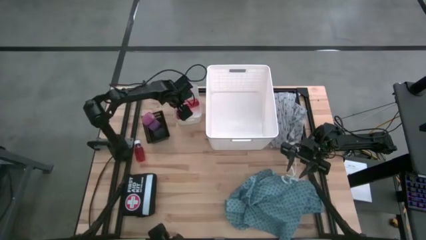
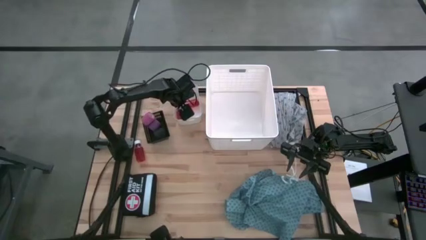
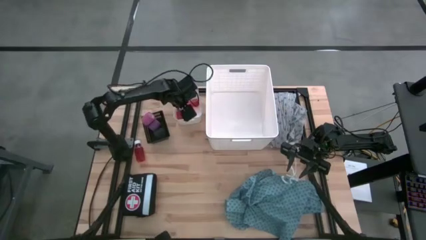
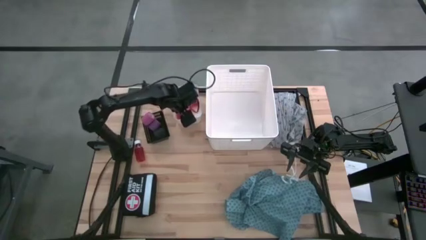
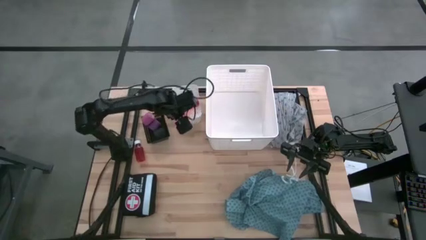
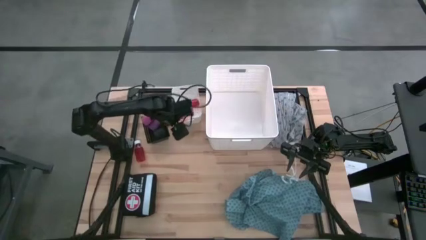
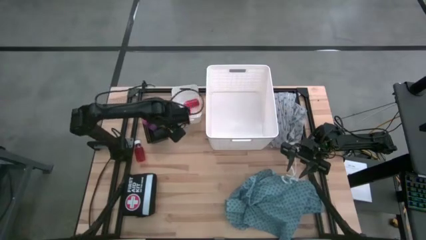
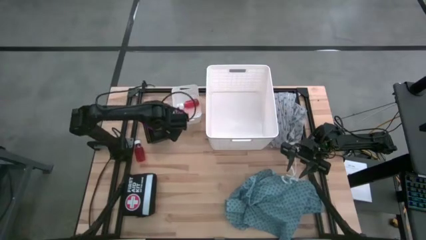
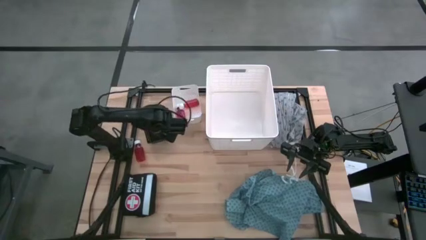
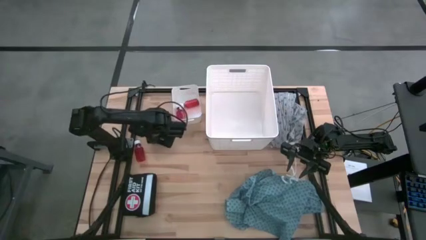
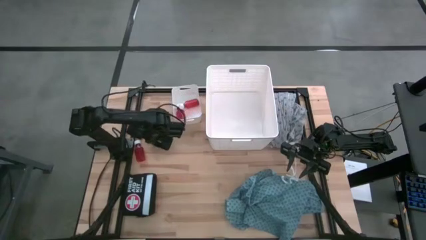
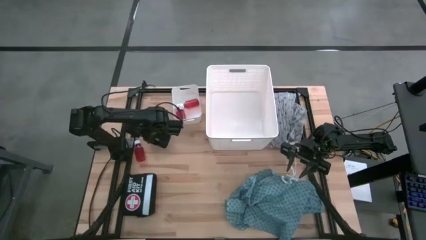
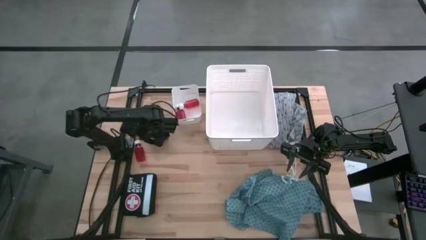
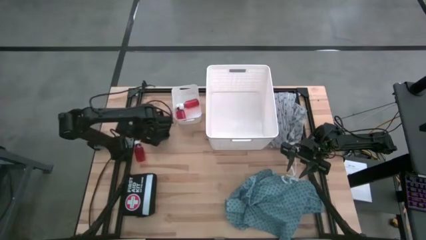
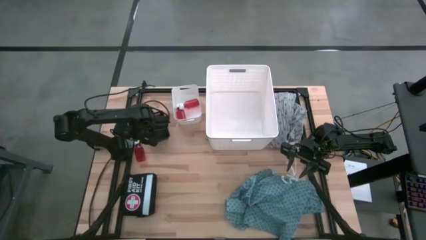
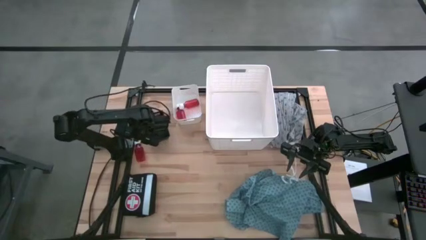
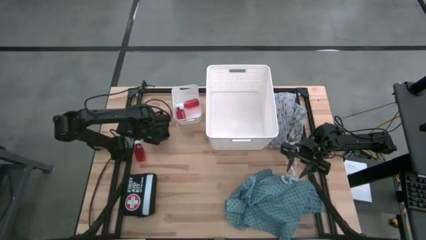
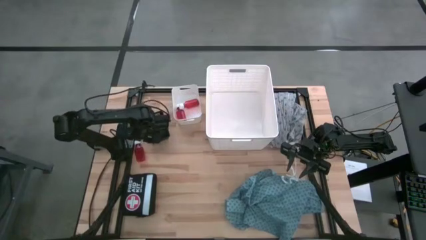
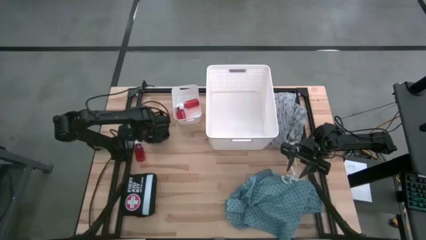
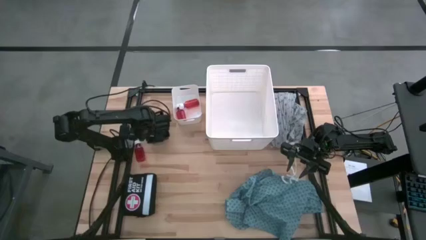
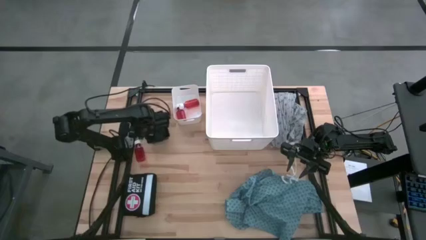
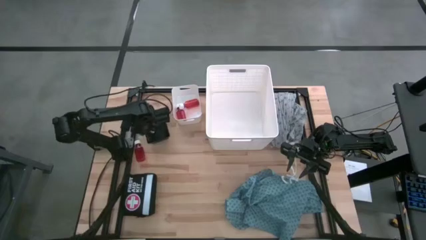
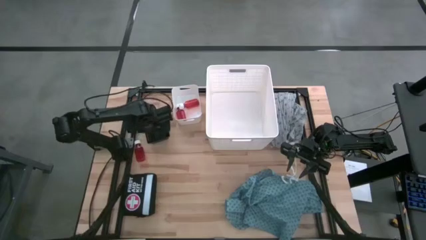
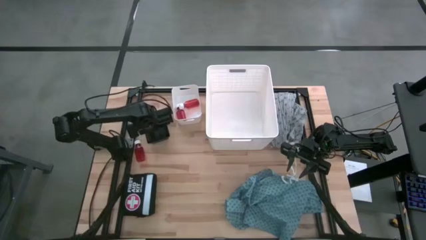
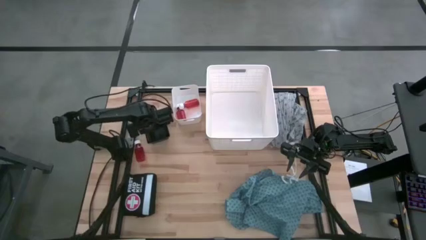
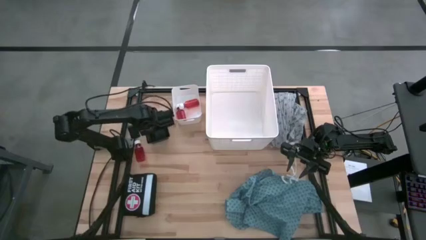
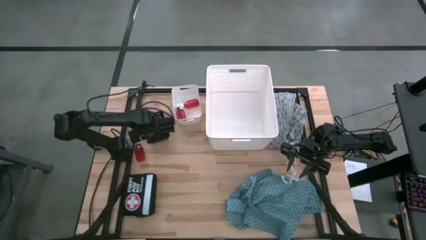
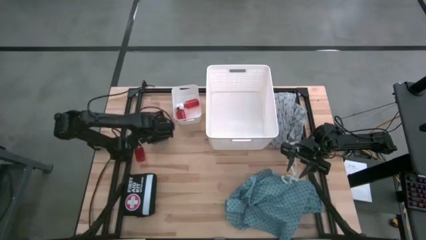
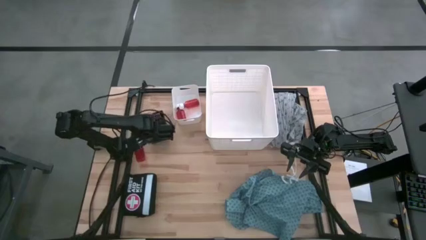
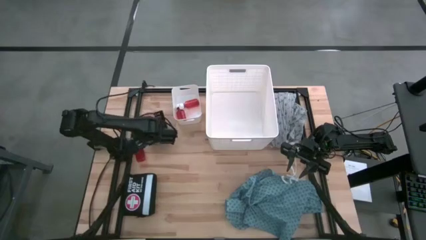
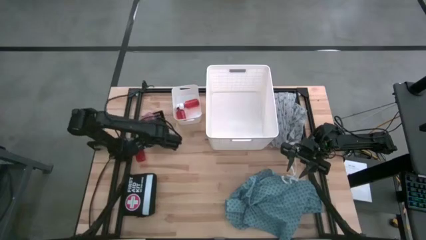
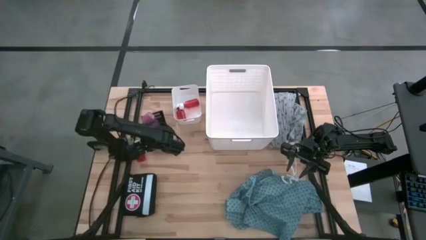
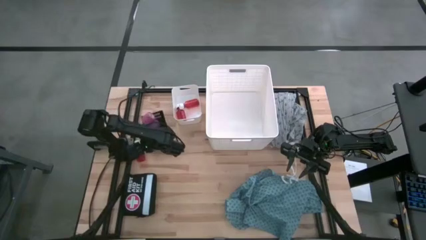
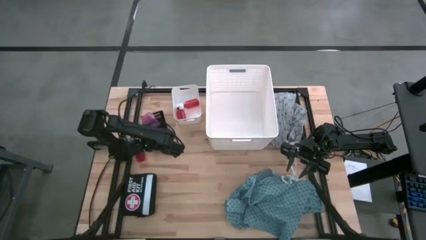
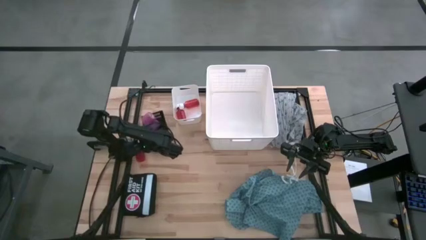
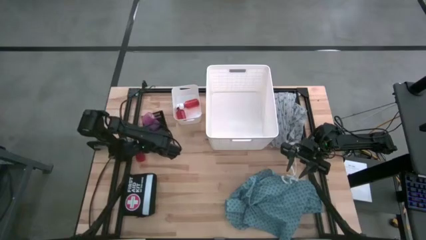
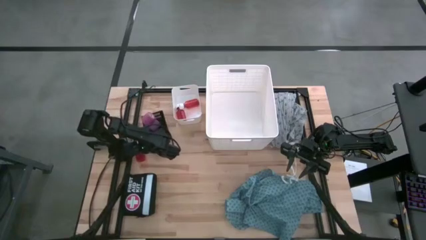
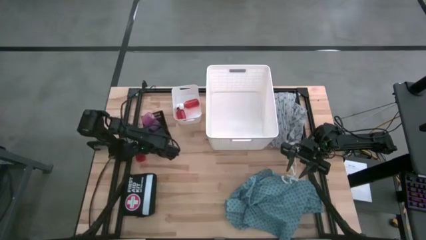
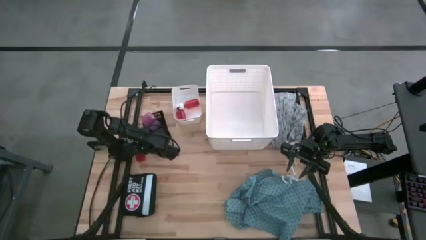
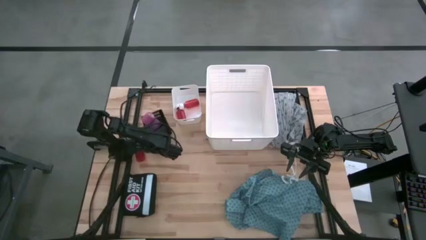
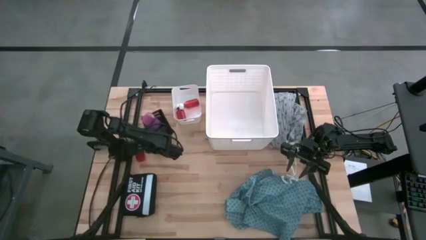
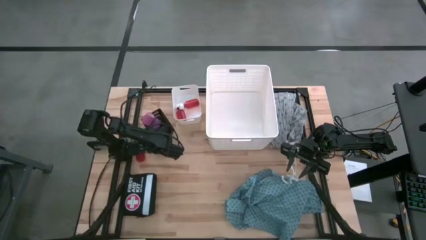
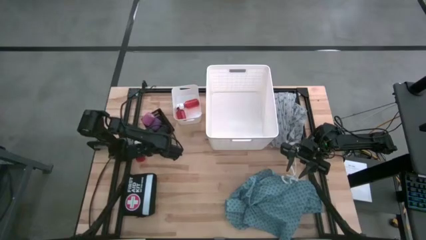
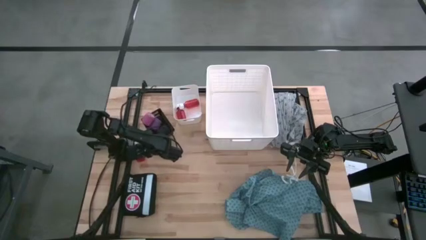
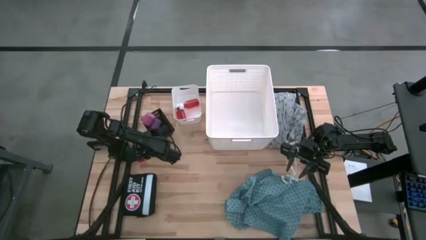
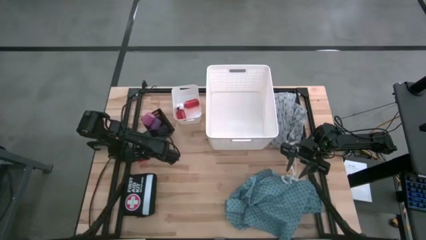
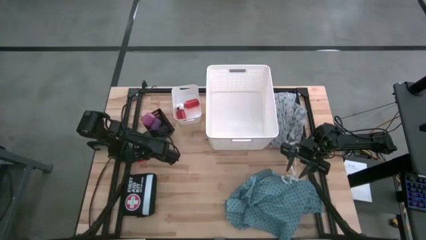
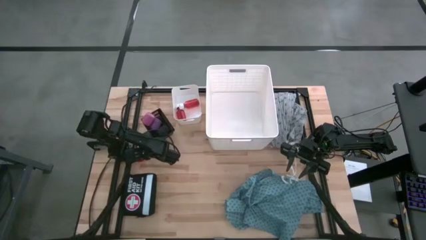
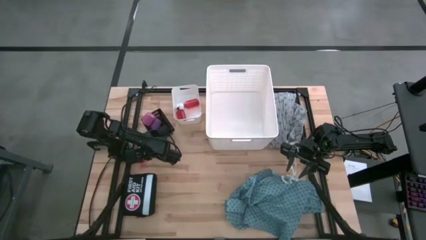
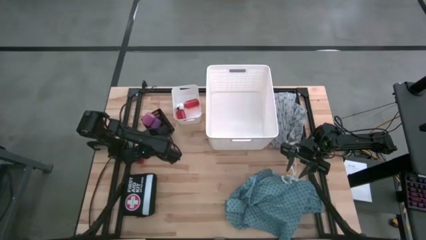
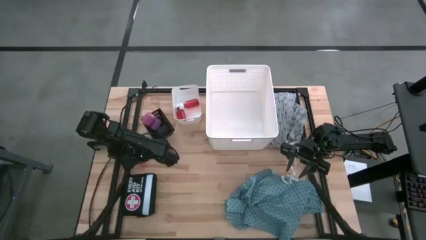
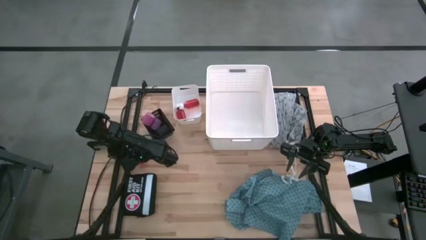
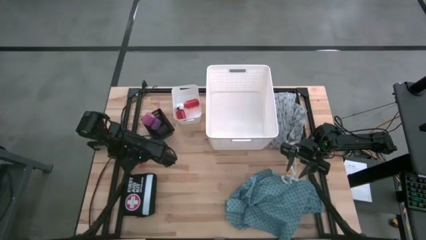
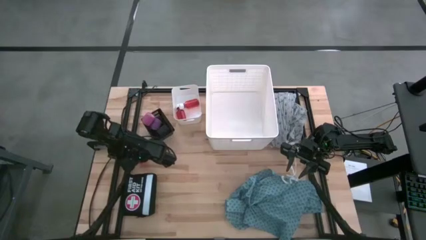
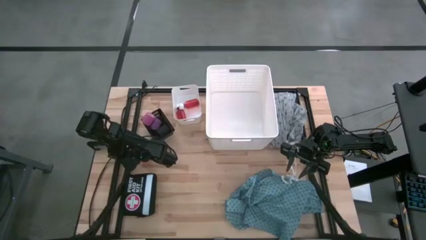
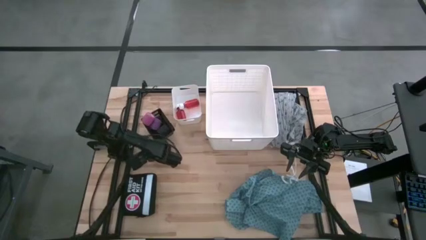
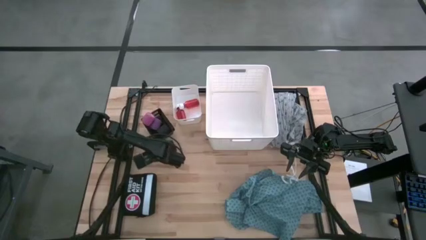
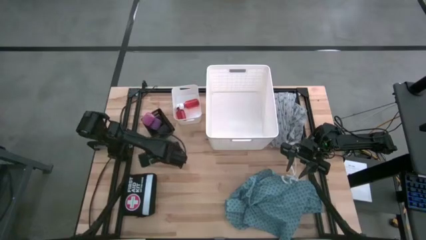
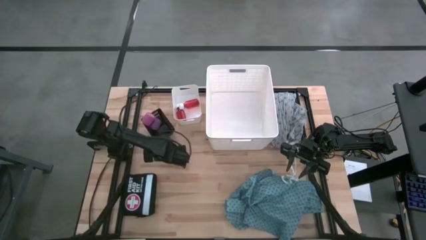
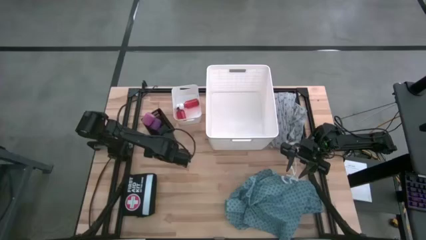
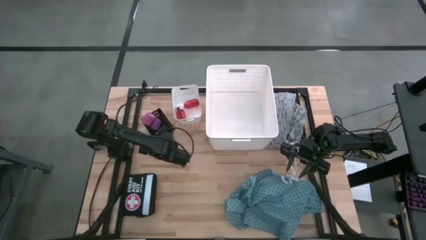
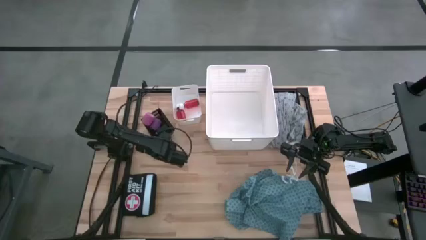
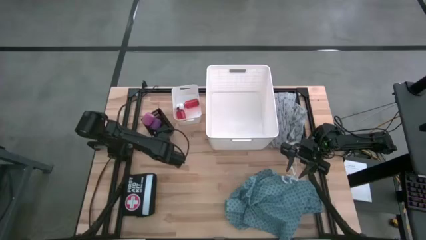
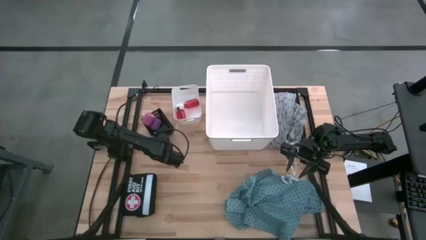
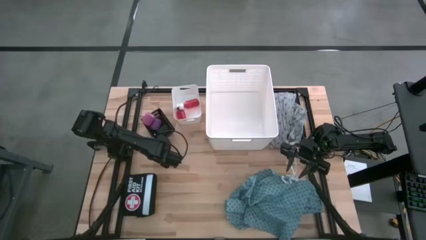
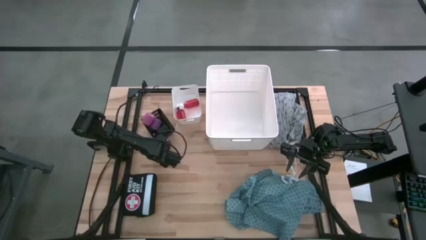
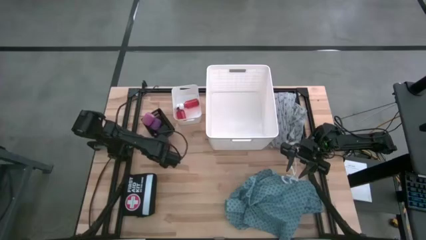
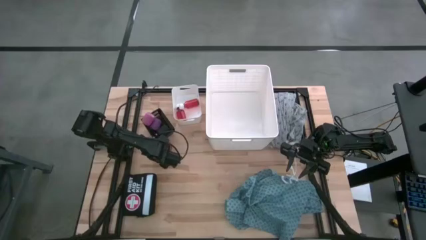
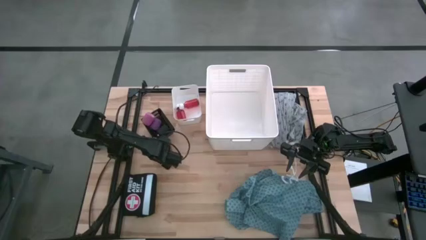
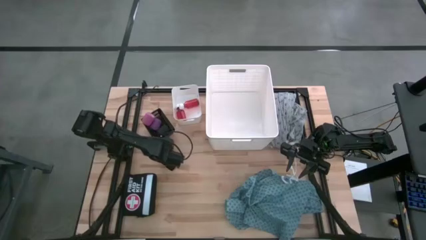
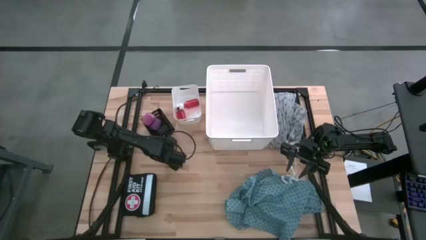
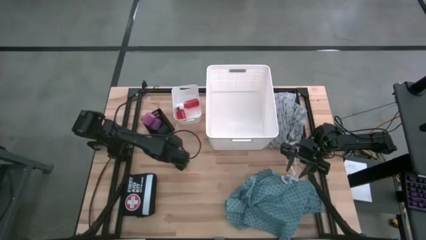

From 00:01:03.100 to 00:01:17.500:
Task: Pick & Place Medicine items
Put the red pill bottle into the white bin

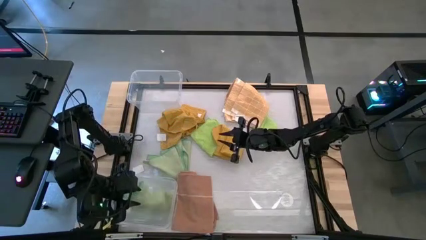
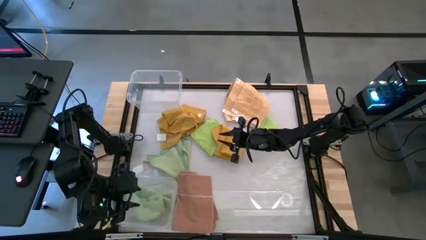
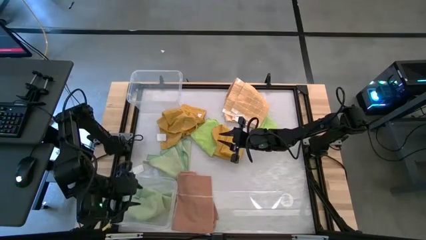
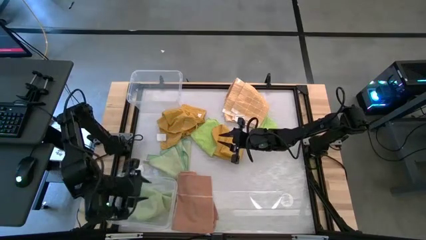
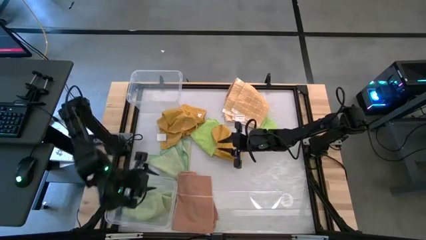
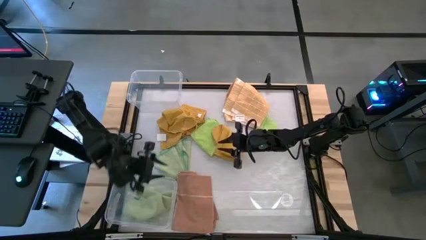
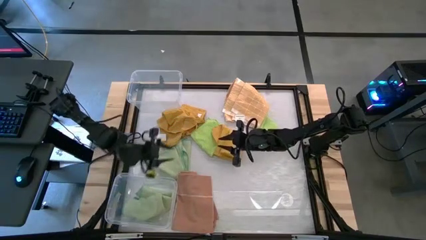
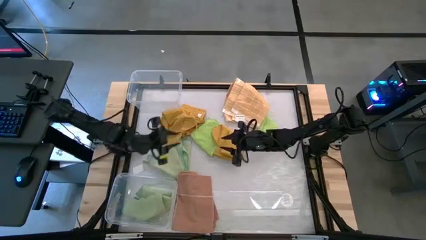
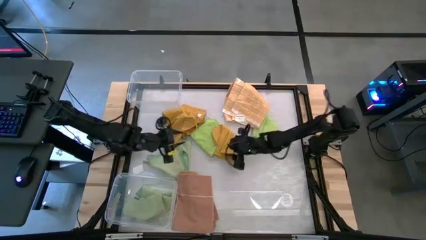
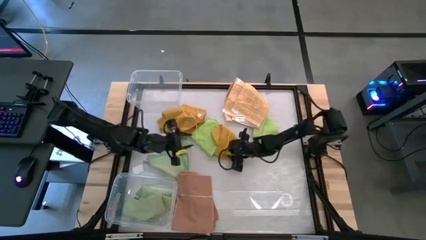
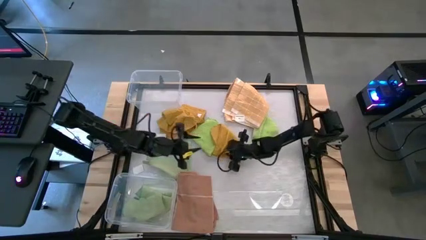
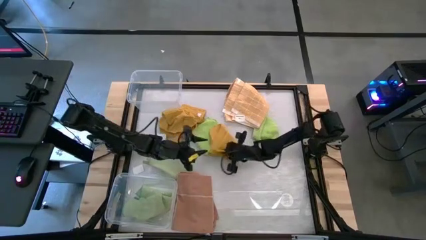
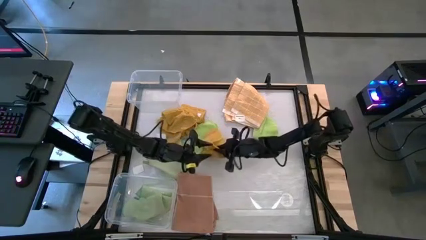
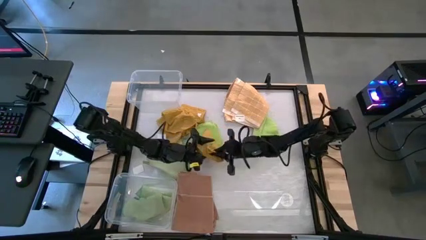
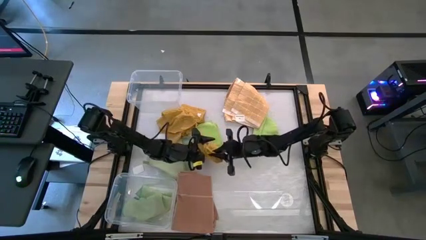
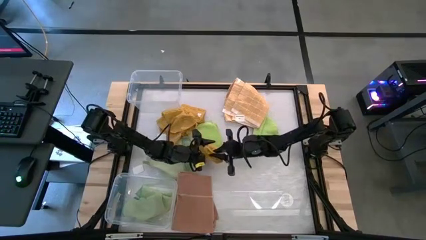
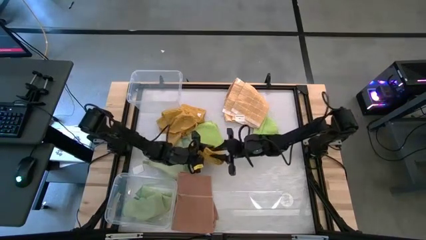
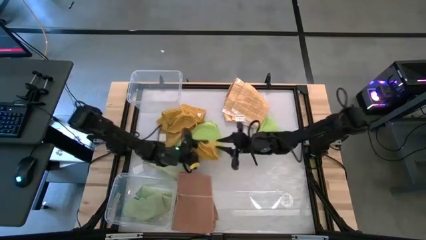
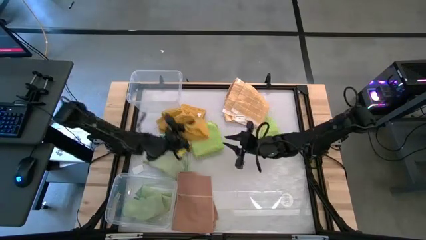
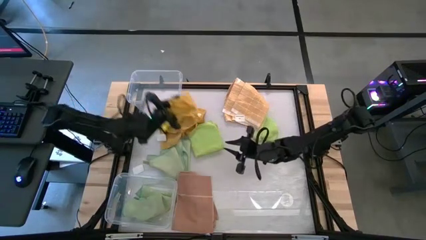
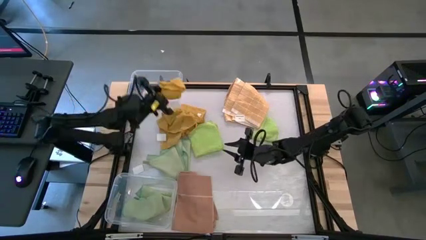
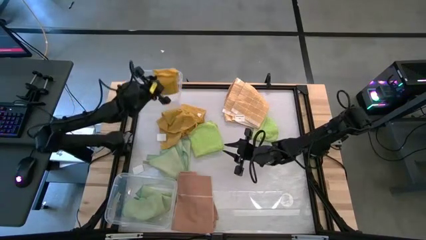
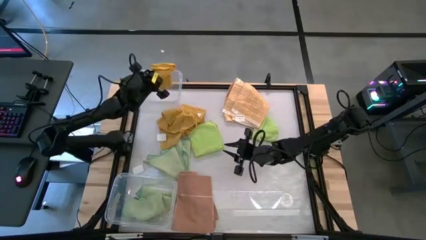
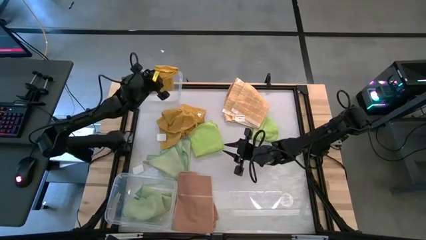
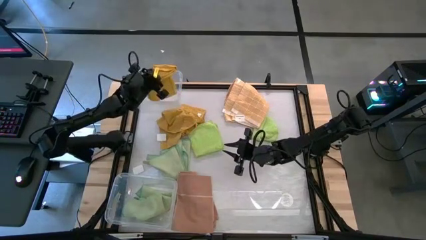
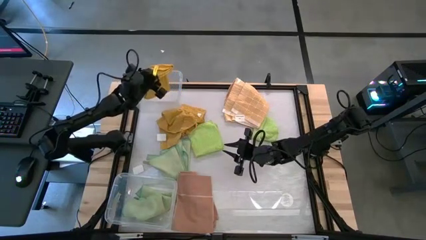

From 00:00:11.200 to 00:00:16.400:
Task: Sort towels by color in basket
Put the right yellow towel into the top transparent bin
